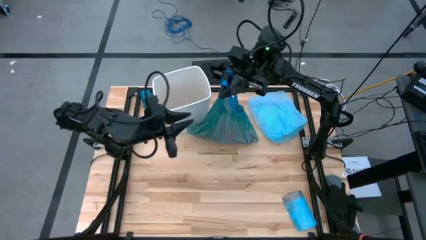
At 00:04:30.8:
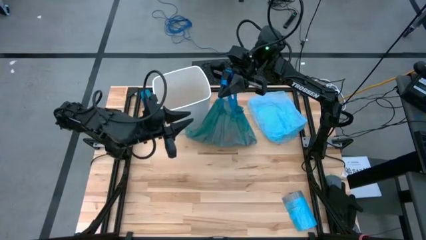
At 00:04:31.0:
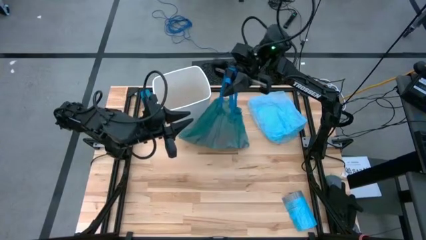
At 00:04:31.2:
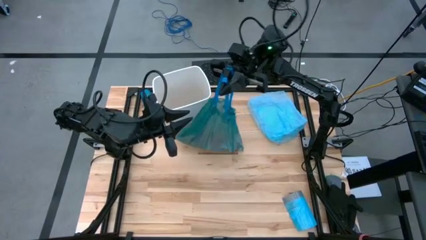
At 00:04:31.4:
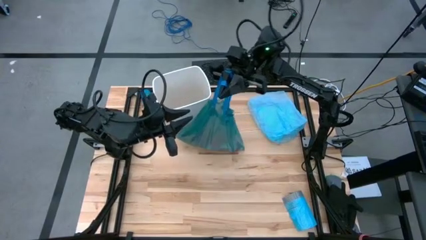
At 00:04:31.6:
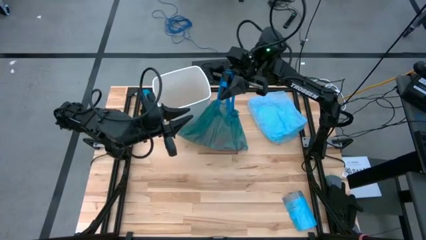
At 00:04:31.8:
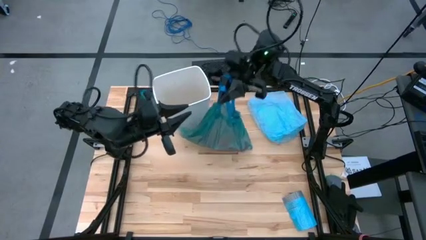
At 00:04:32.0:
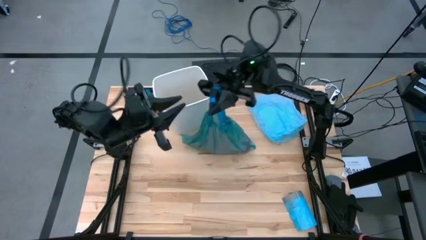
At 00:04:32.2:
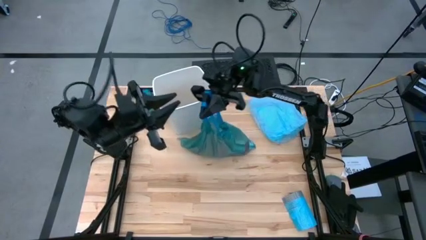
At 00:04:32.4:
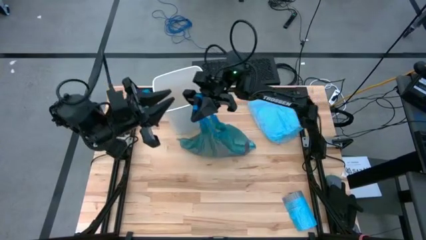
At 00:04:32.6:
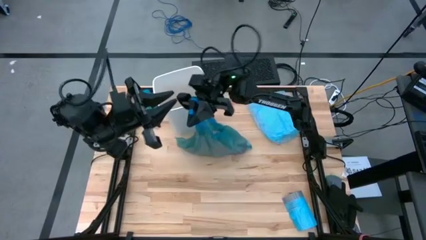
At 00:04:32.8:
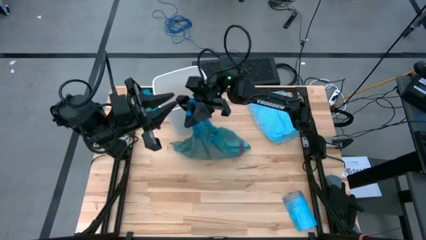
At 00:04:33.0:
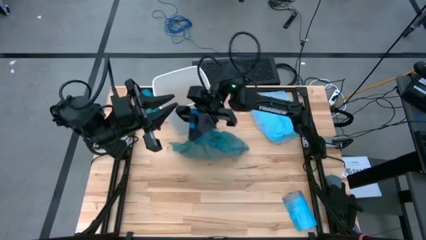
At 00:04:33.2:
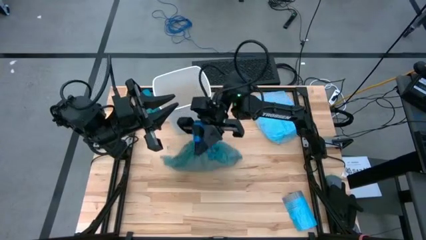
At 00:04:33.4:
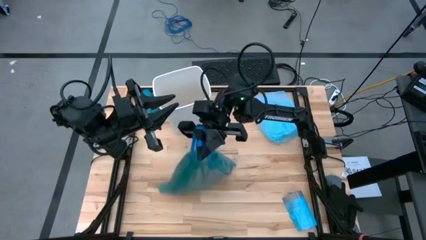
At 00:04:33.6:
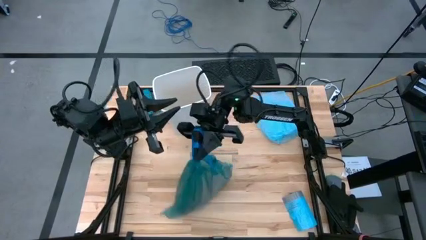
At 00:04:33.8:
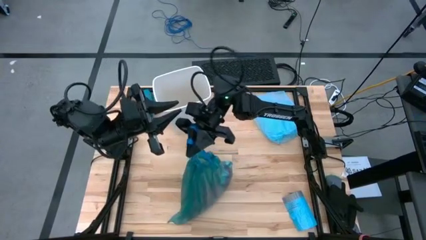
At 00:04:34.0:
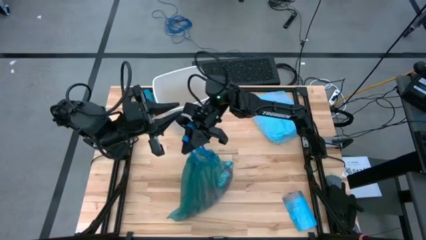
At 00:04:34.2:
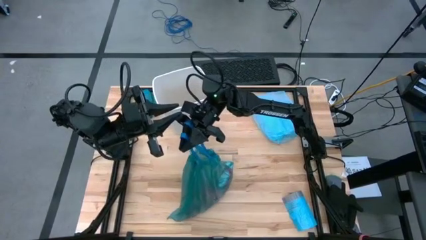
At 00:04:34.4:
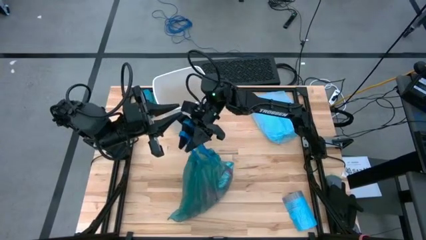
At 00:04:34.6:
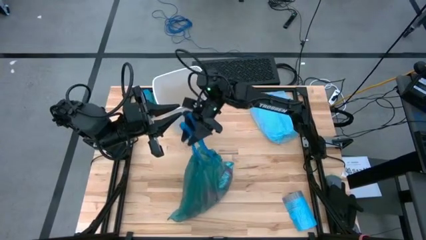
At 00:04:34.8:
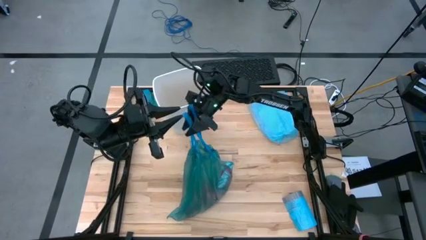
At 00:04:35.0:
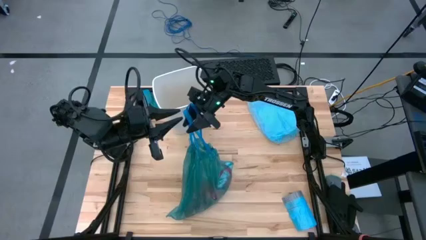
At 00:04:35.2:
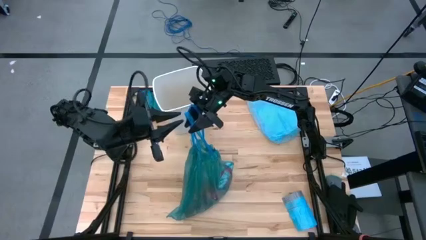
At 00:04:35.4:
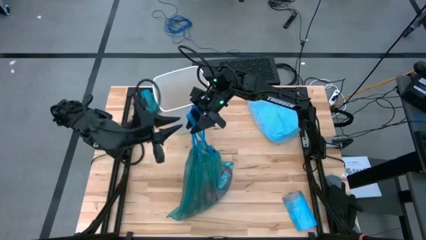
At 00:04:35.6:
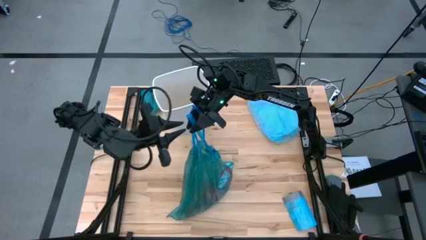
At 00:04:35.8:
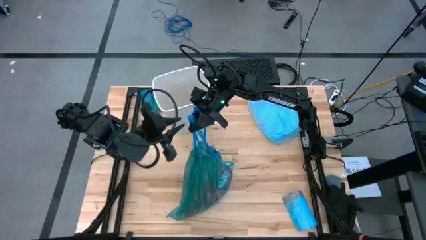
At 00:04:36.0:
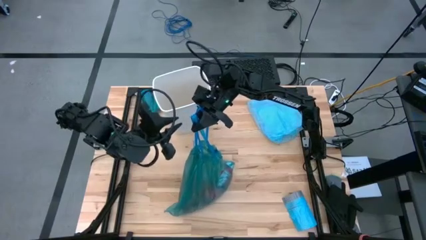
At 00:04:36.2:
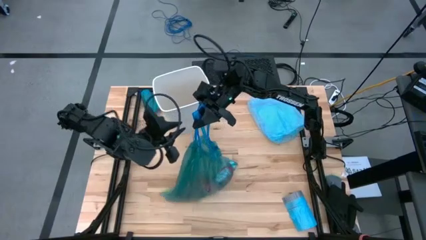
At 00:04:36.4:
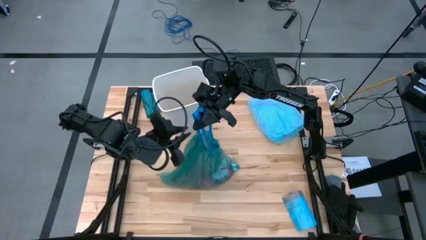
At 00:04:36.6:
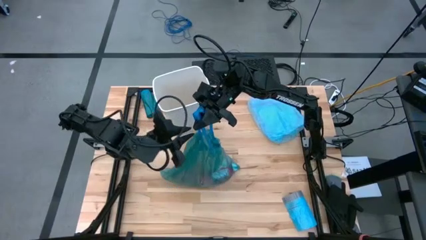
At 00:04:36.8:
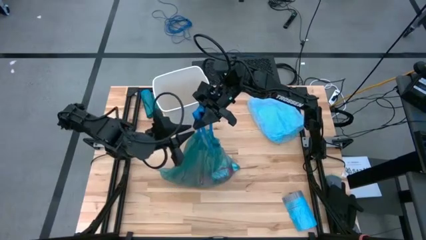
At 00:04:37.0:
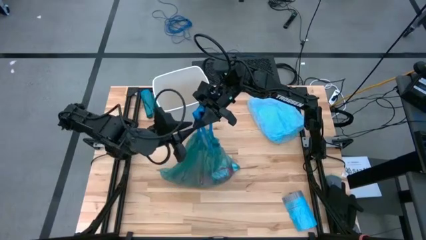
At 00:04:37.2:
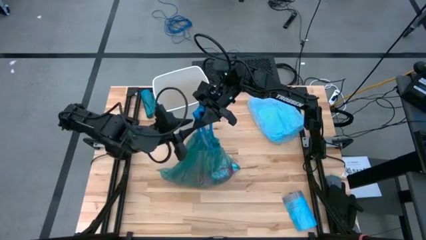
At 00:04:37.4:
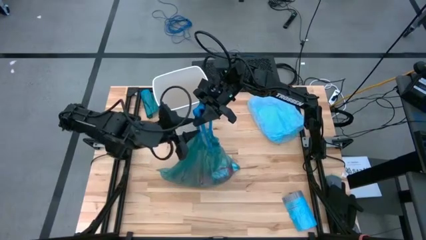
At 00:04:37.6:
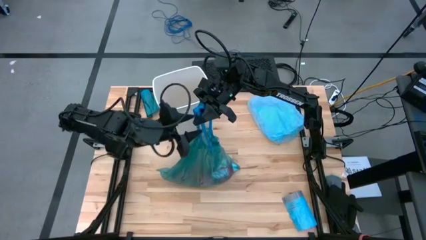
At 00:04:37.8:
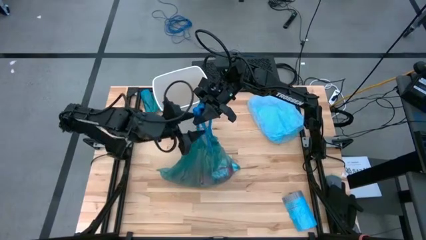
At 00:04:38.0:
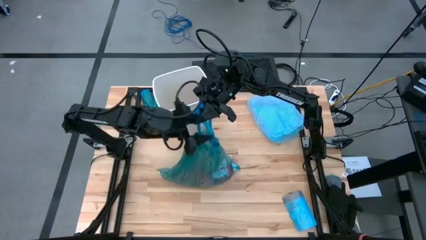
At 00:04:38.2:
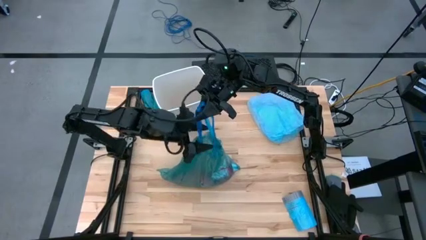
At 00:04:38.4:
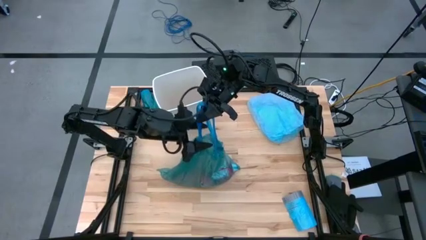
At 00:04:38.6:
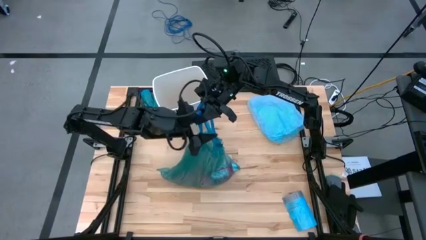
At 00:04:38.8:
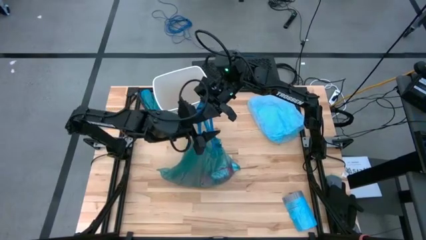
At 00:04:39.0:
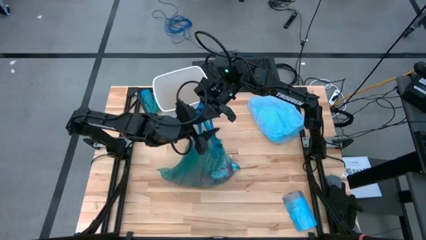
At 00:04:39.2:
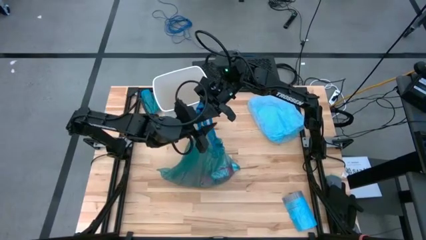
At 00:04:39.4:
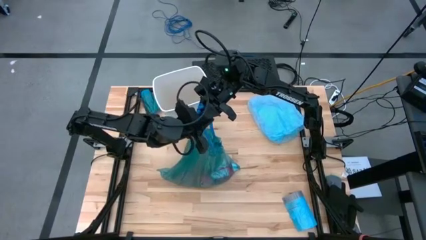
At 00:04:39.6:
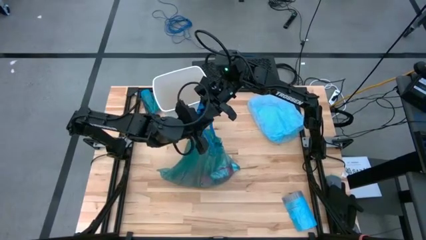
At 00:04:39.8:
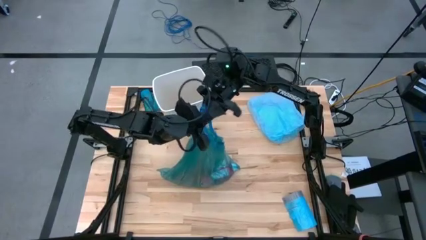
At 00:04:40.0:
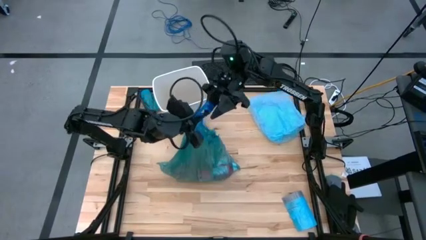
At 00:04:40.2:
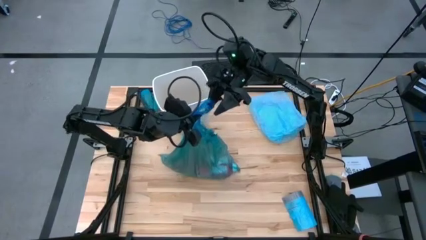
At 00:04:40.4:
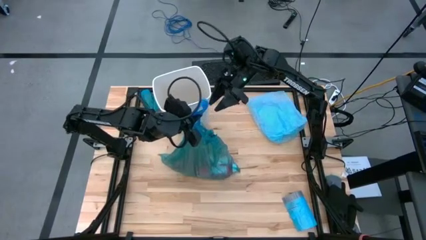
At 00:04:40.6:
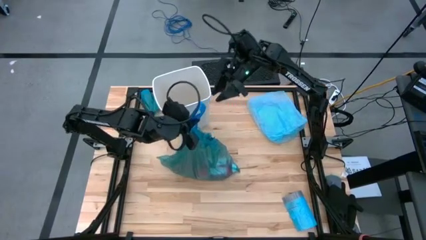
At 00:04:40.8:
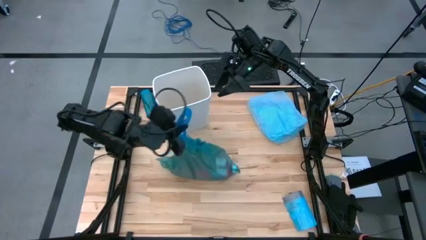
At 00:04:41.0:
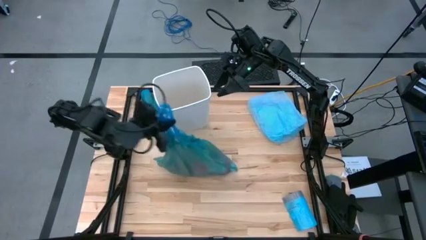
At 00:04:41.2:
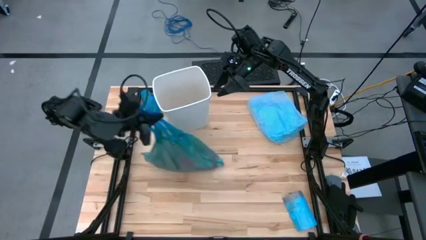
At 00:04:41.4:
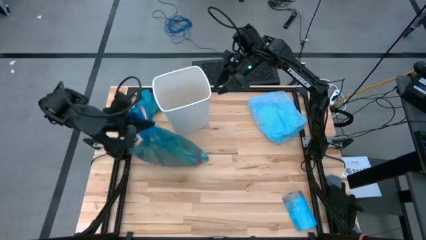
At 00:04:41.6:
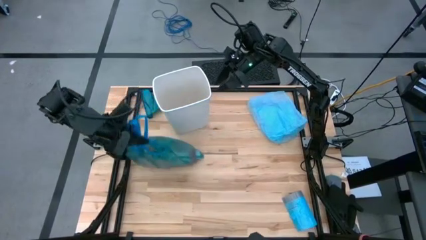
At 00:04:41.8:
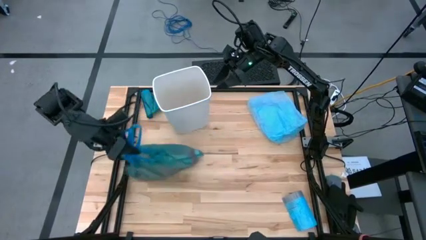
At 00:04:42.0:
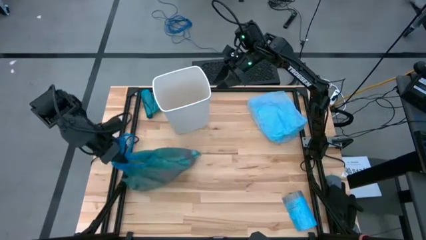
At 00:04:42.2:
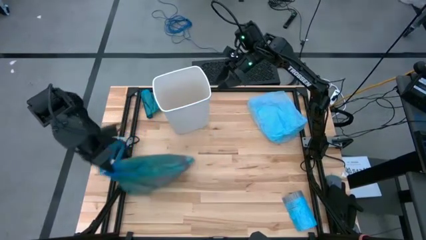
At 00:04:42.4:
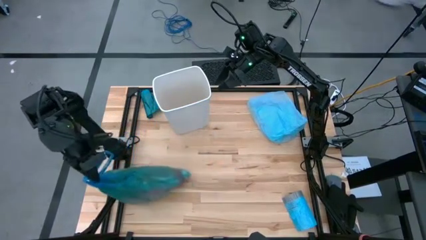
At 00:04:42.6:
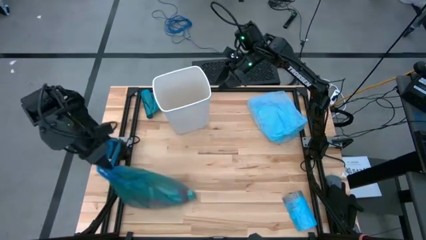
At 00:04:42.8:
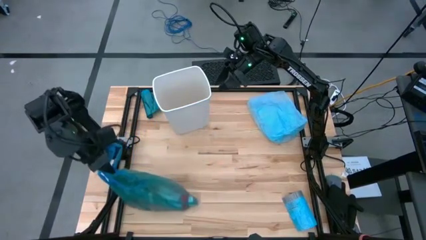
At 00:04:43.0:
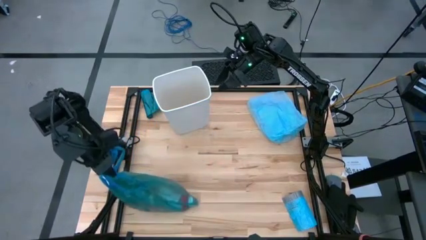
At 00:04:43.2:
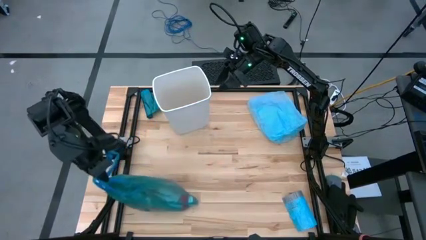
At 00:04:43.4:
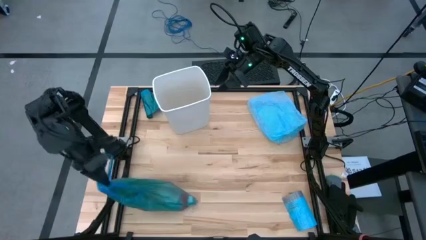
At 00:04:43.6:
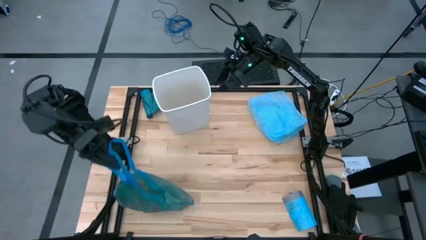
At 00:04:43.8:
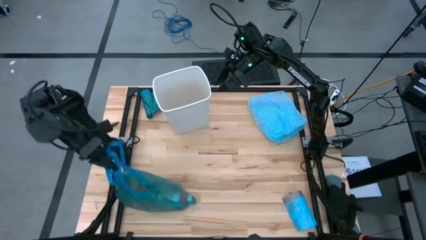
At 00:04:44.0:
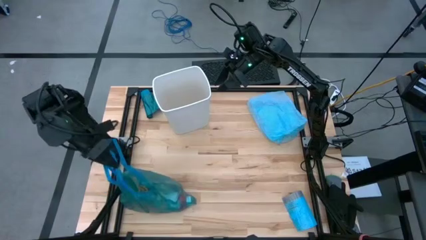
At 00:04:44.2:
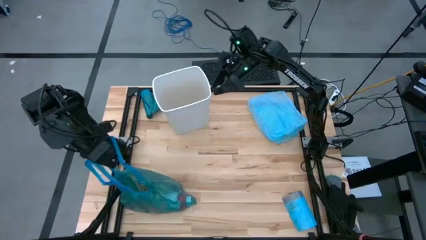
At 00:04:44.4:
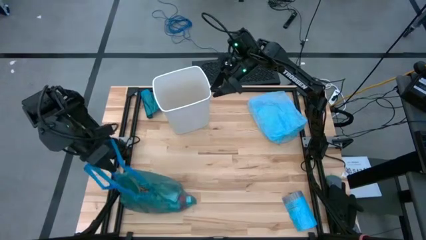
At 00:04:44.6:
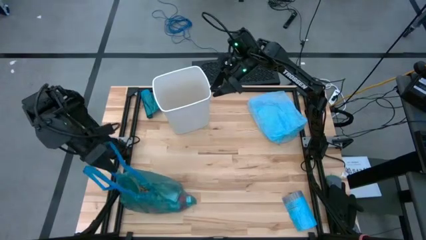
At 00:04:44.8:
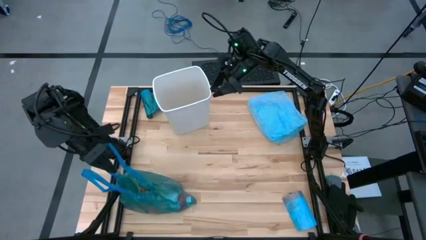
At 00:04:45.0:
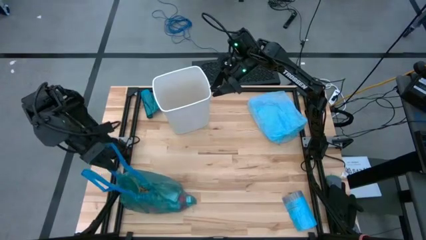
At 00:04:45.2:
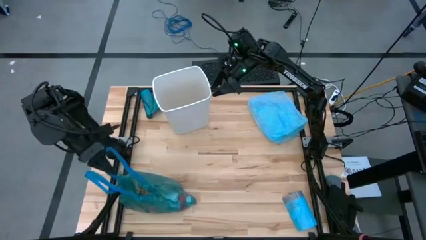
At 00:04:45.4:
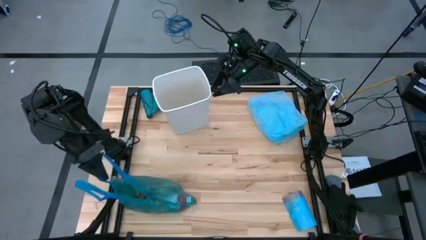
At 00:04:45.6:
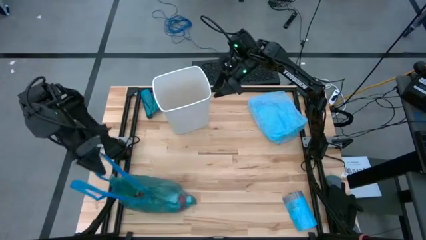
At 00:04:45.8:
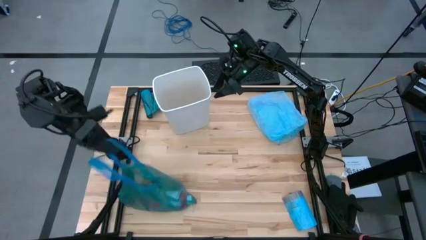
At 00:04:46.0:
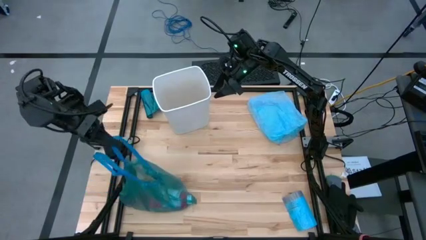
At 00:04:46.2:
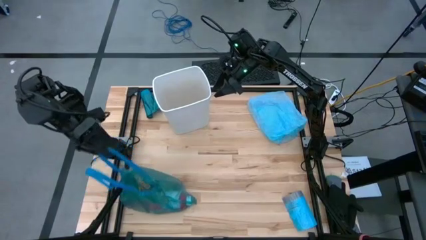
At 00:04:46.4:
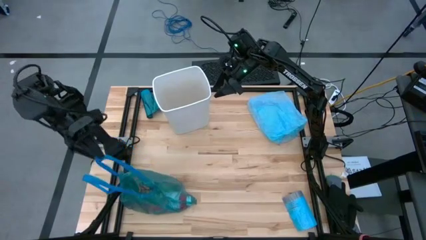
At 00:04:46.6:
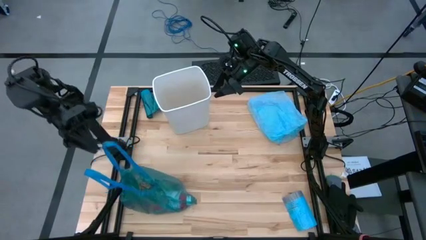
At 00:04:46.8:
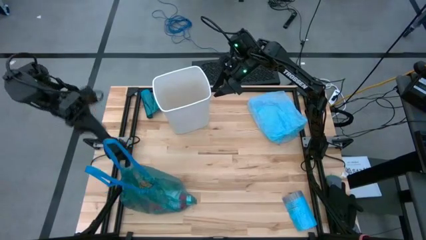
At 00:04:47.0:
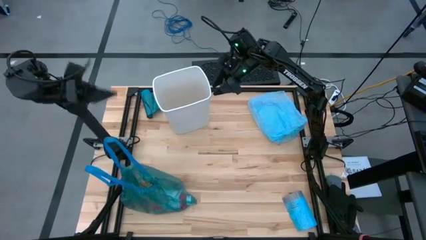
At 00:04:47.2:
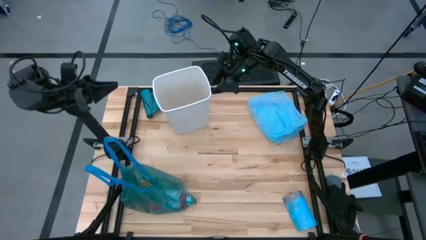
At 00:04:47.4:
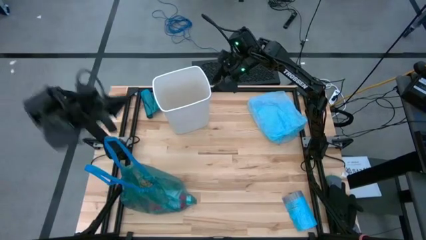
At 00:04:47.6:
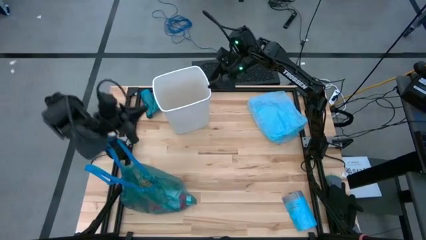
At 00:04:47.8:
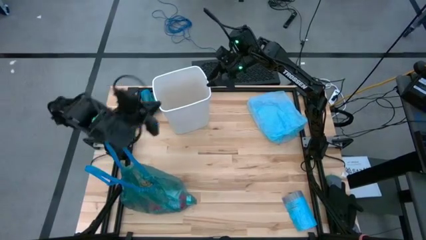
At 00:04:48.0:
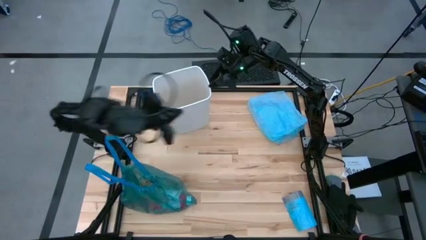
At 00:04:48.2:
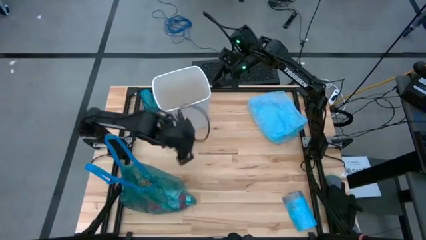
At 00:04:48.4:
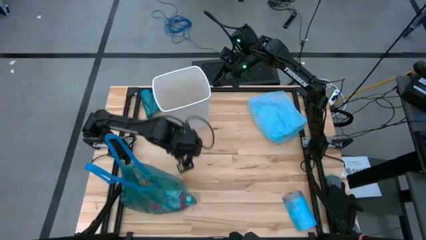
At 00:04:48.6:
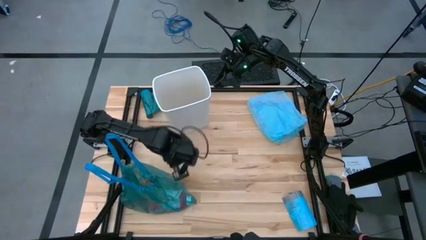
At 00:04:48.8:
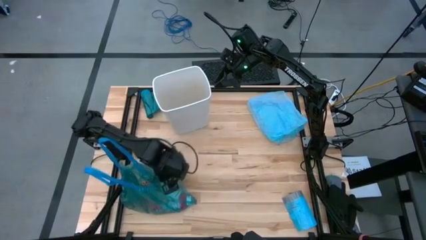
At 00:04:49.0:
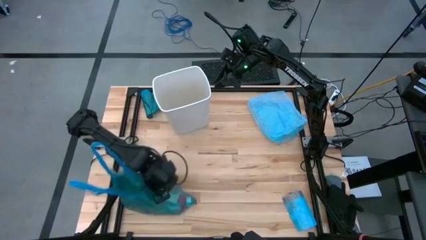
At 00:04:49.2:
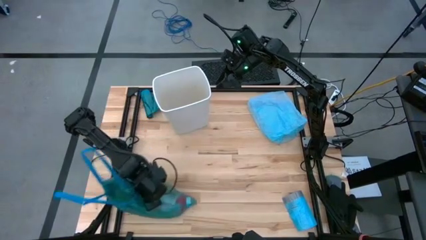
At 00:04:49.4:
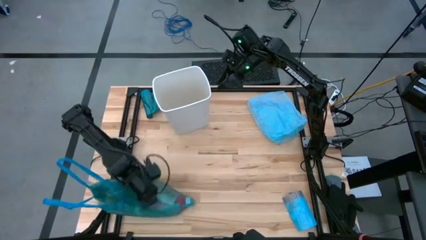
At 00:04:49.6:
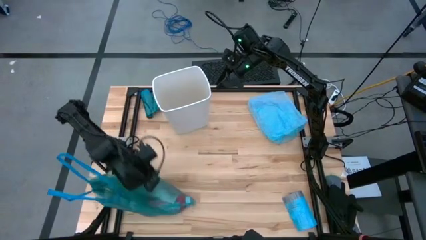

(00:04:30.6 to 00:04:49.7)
Task: place trash/remove bag and relplace
Close the blue trash bag
